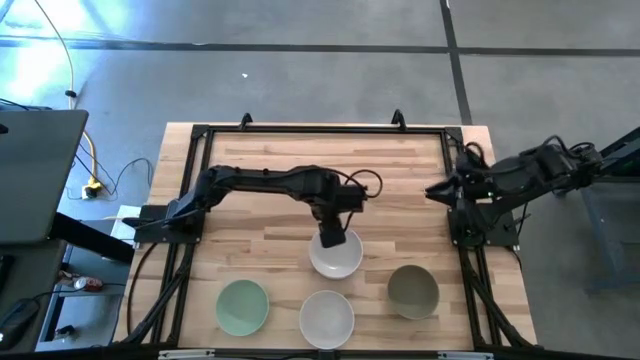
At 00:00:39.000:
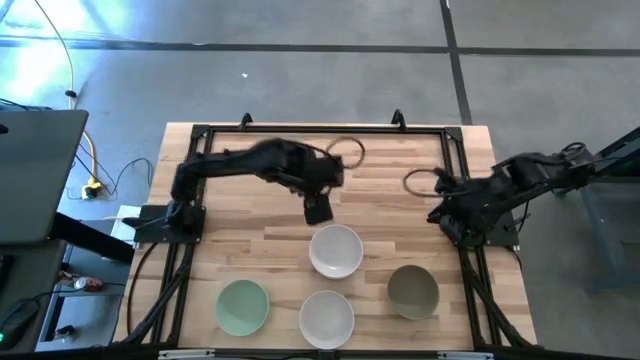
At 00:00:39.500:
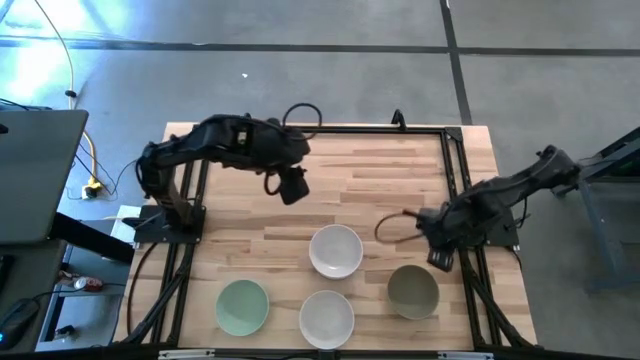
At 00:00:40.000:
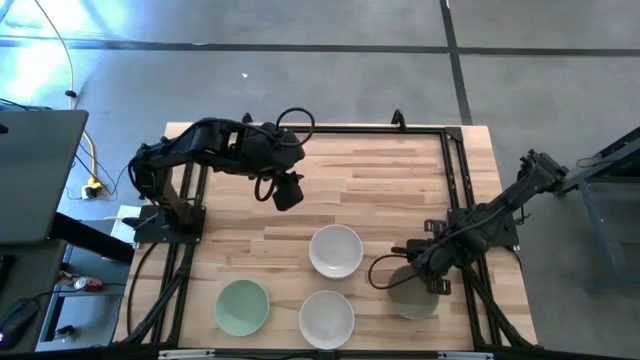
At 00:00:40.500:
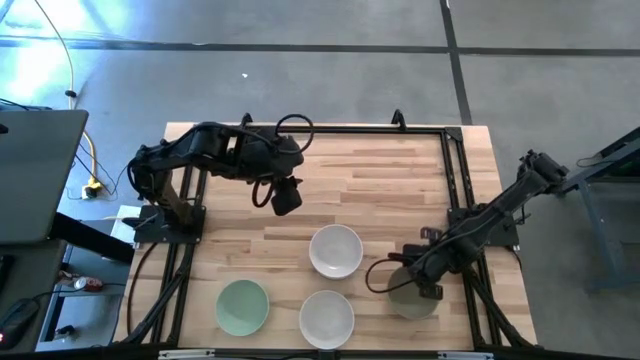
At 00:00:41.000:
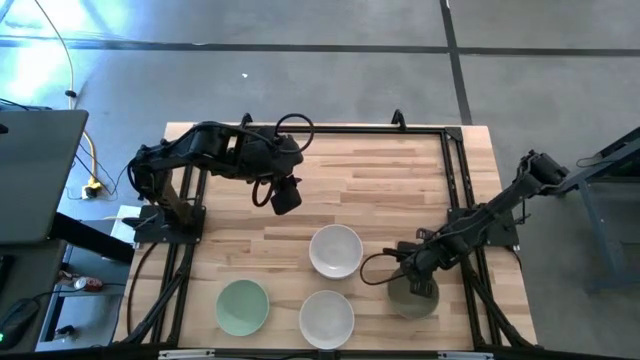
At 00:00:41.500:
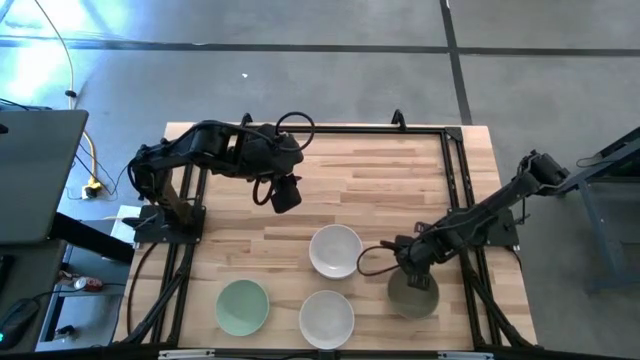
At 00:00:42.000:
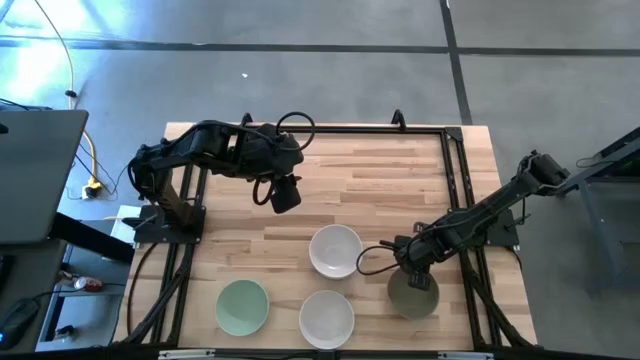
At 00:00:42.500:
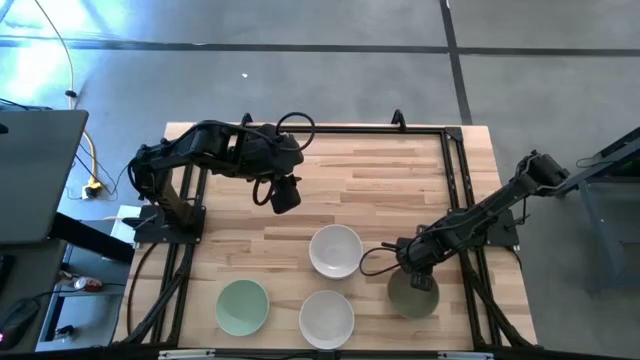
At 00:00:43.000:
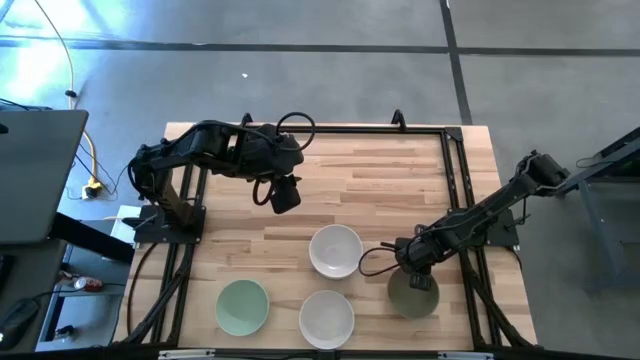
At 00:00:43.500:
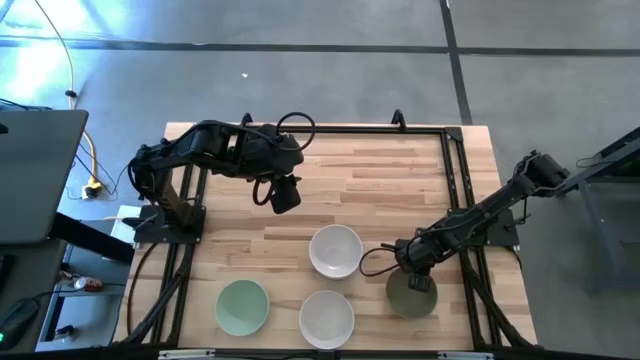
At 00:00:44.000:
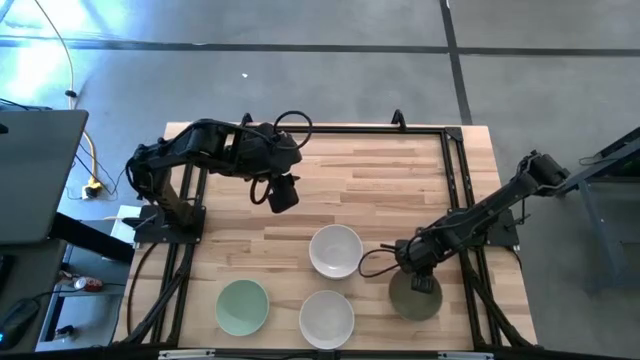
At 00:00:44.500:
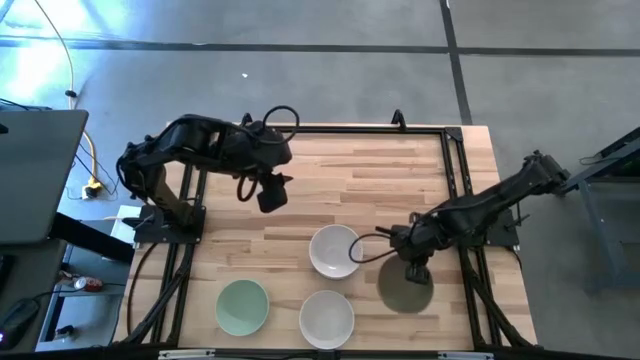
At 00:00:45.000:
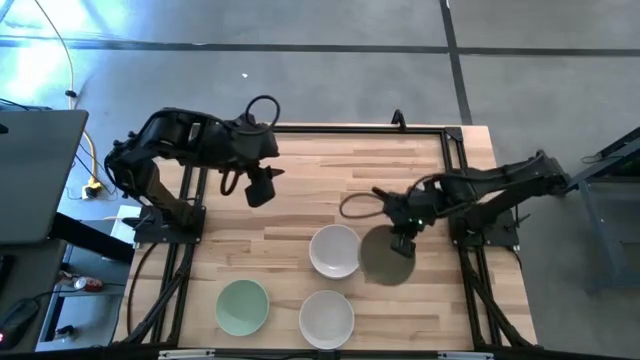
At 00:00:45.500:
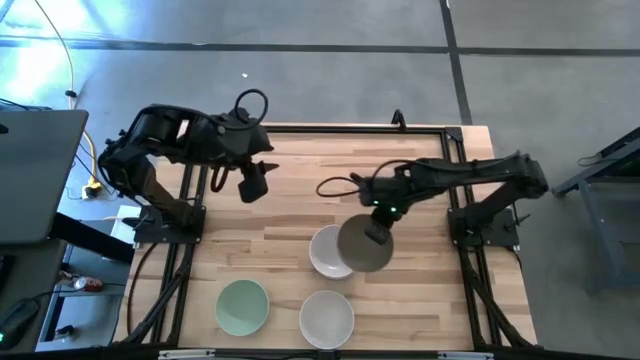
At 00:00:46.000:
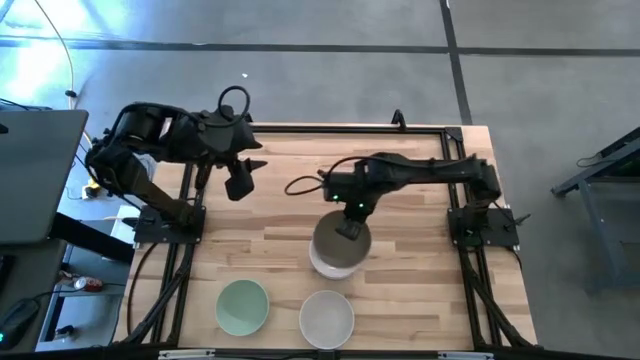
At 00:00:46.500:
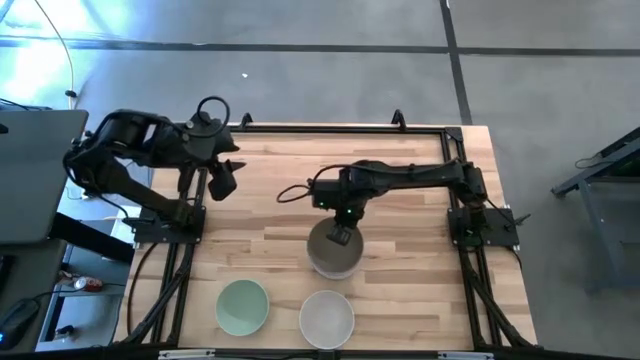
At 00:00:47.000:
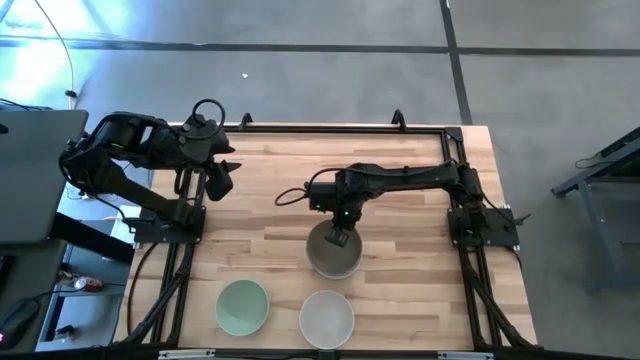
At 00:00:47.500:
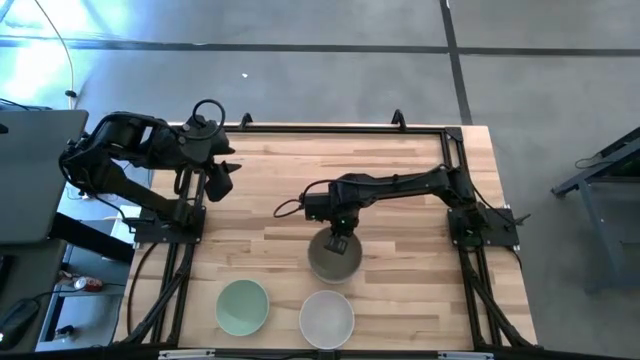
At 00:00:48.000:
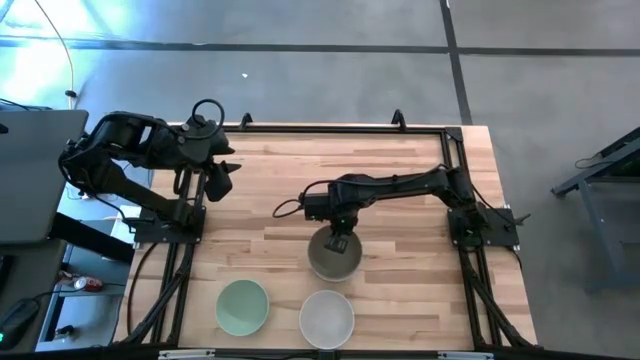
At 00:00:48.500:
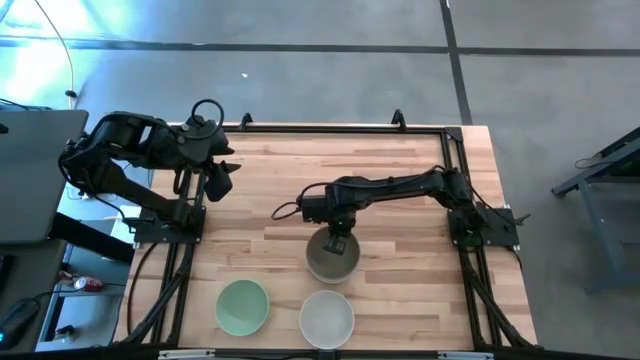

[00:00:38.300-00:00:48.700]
Task: Nest bowls inside each other
Stack the gray bowl on top of the white bowl

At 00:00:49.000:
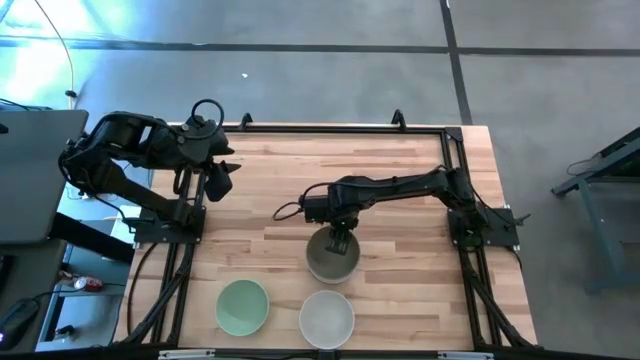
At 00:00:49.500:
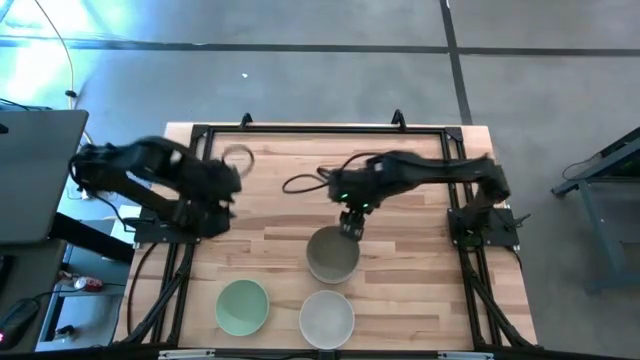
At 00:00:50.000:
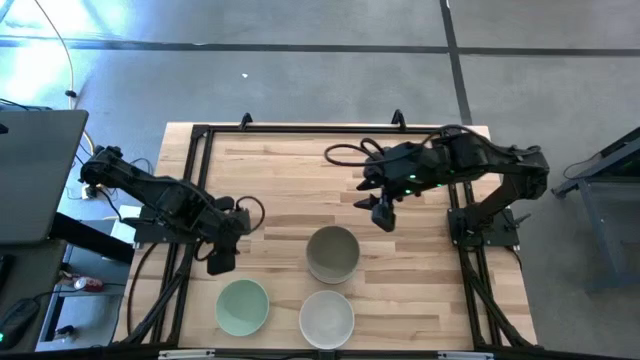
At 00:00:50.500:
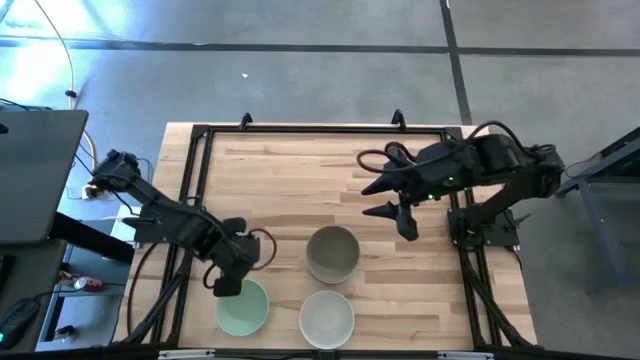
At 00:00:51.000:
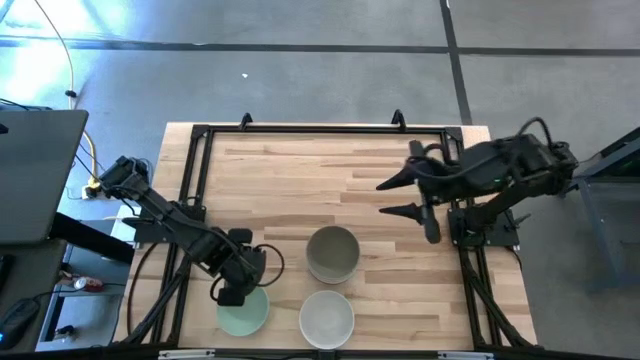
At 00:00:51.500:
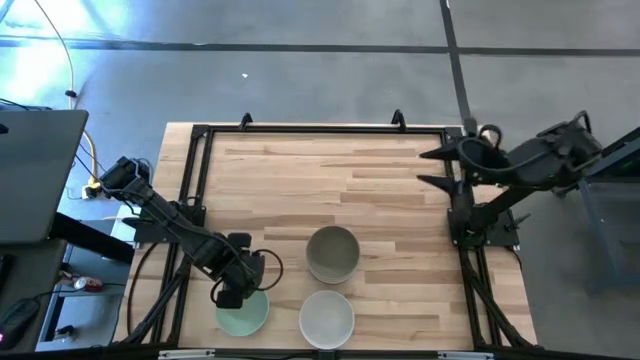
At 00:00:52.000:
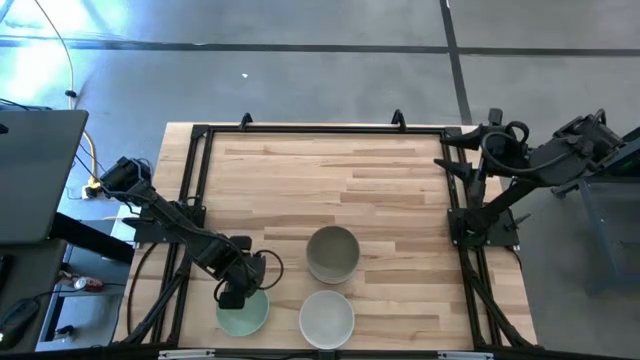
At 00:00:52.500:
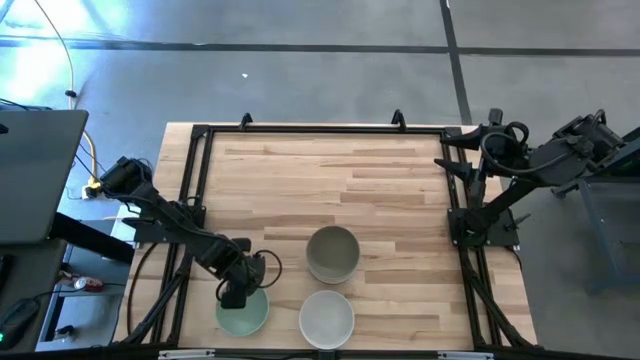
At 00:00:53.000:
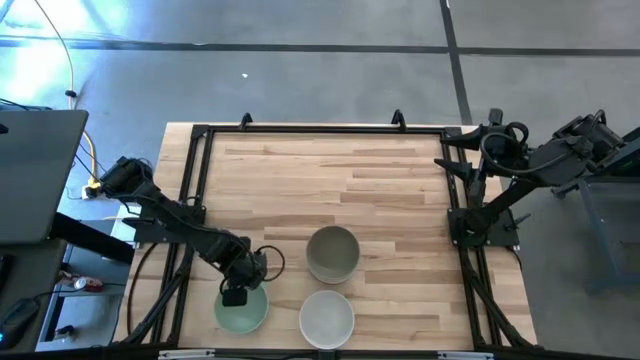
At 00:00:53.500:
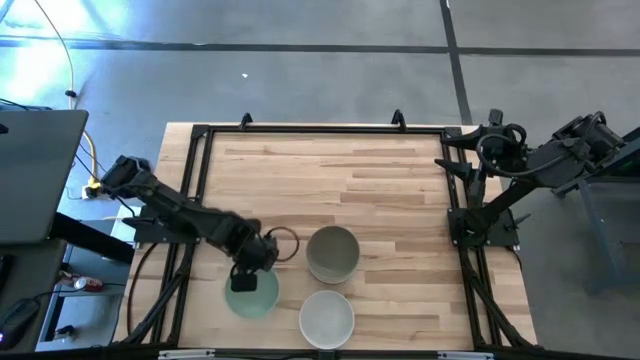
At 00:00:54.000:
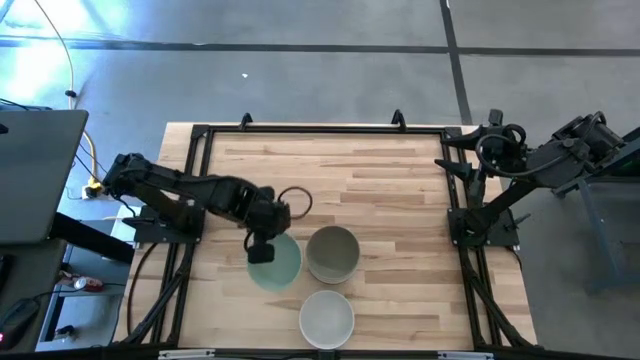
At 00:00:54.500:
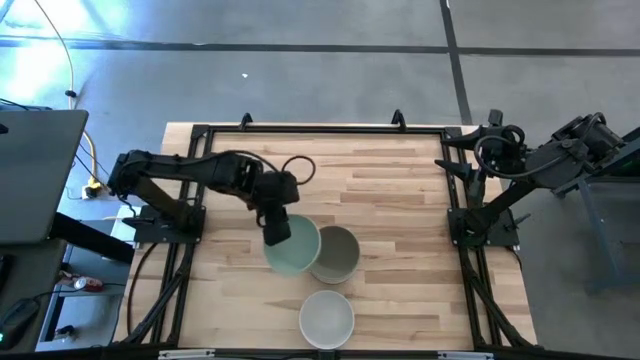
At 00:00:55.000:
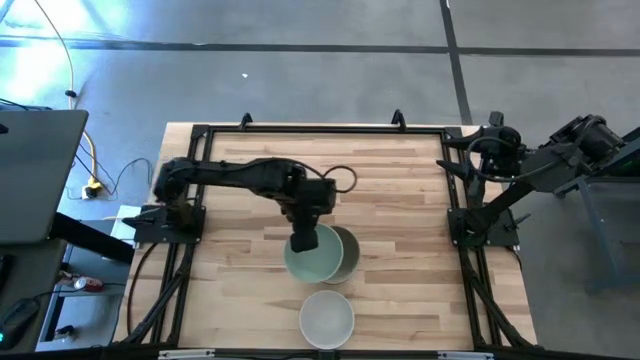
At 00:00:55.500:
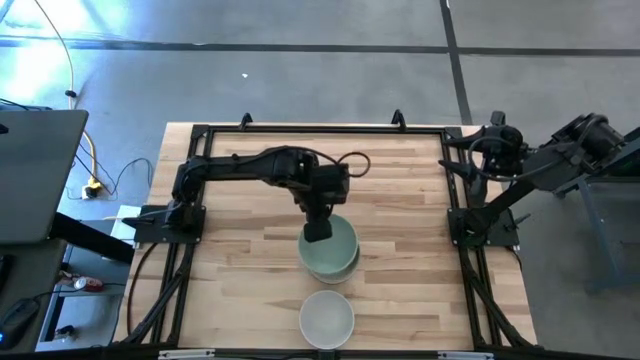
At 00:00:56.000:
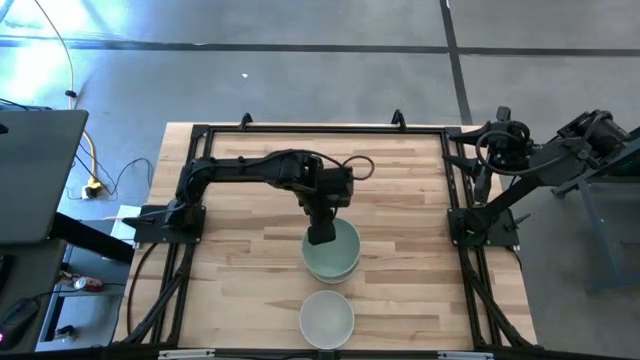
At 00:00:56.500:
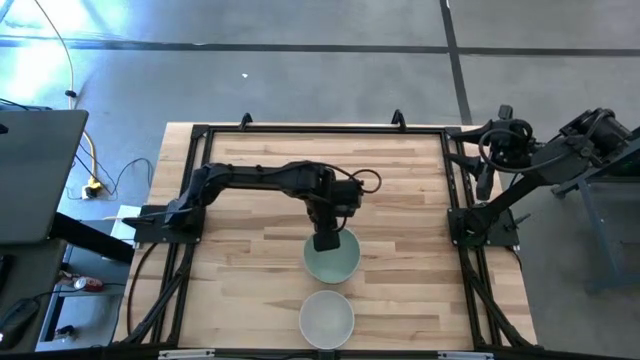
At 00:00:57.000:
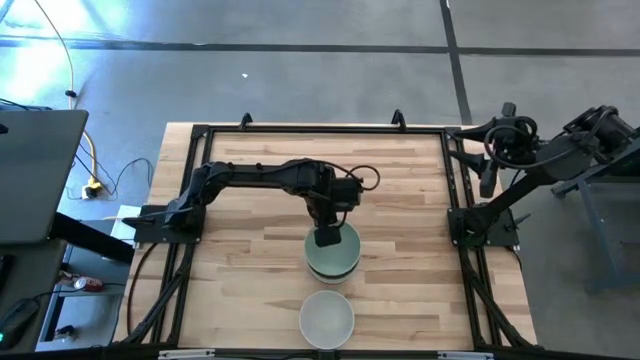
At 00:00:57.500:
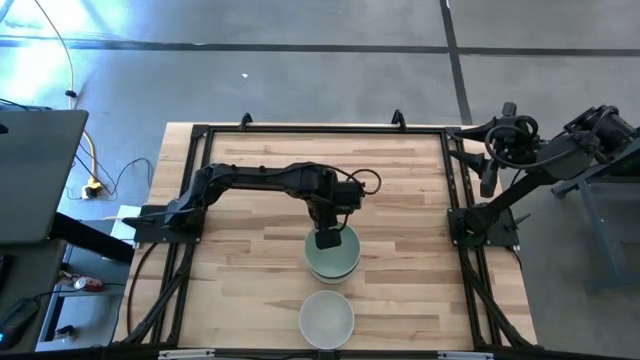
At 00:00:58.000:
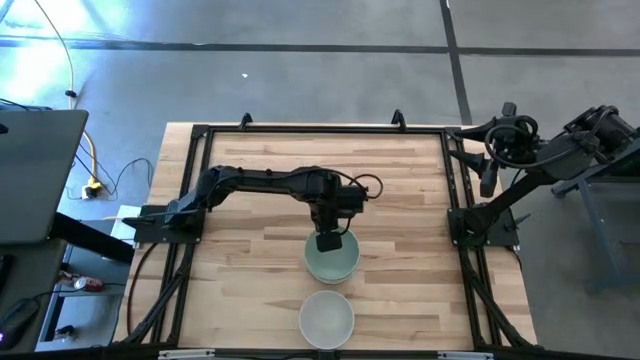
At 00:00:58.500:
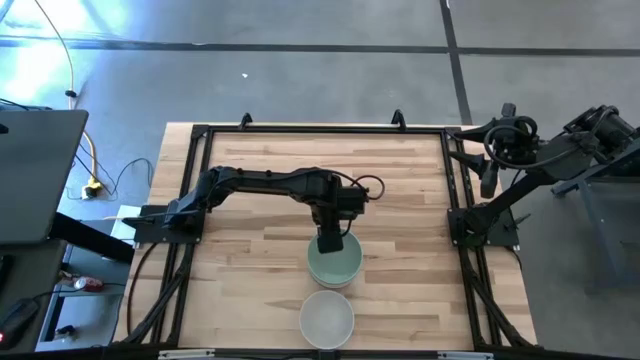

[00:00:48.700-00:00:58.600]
Stack the blue bowl on top of the gray bowl
